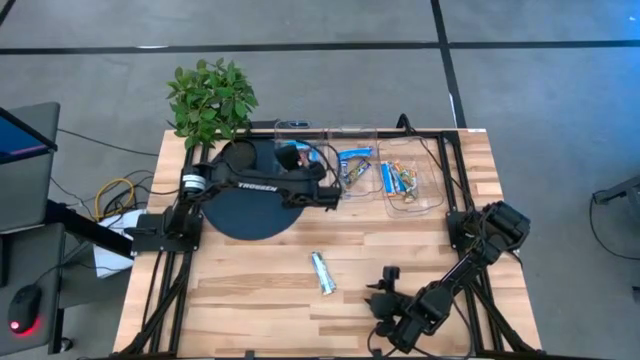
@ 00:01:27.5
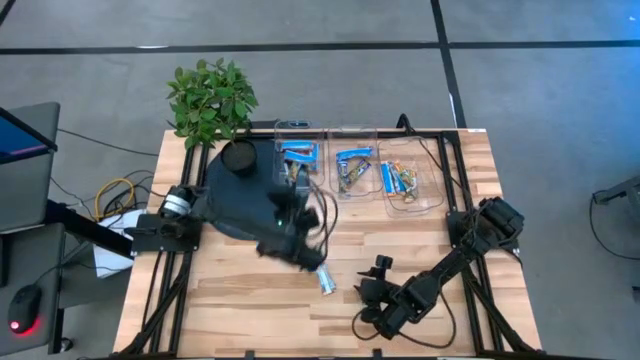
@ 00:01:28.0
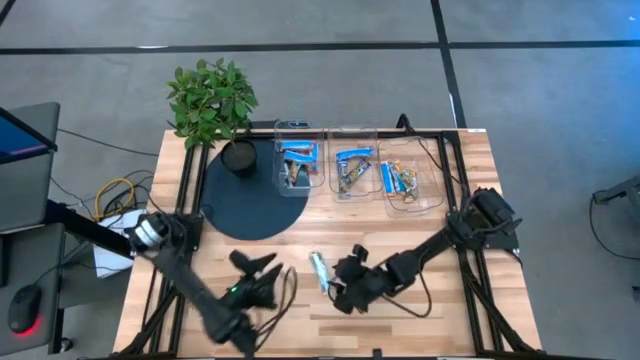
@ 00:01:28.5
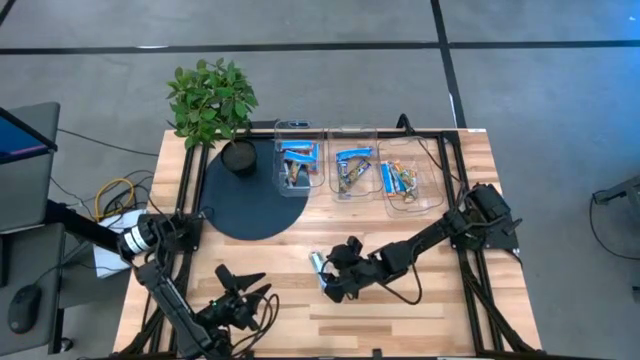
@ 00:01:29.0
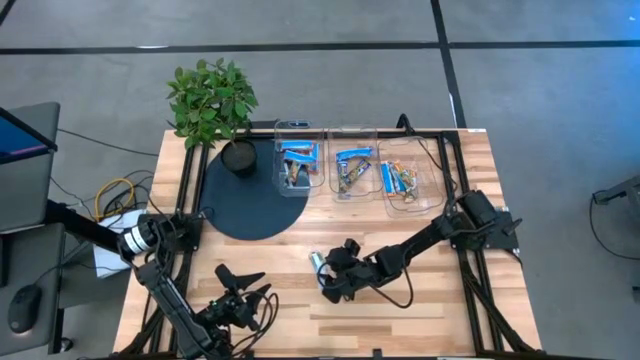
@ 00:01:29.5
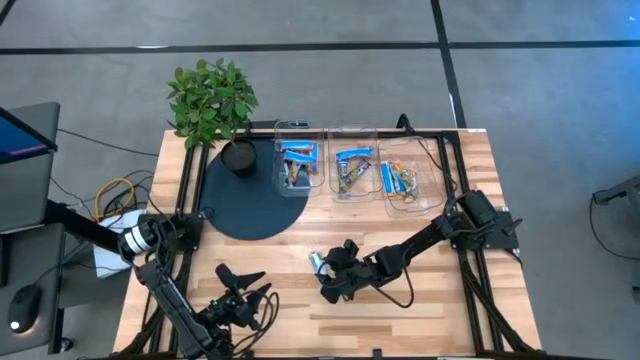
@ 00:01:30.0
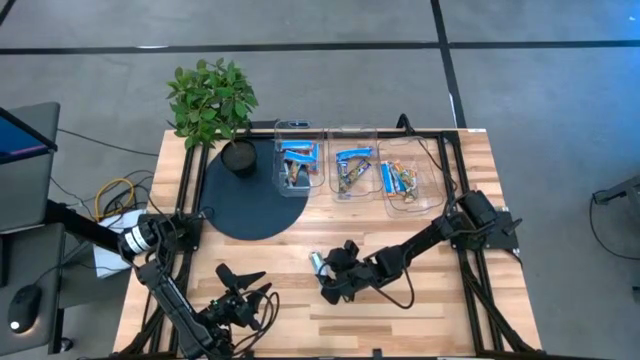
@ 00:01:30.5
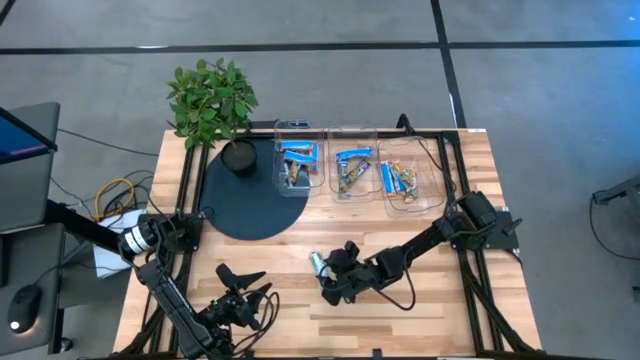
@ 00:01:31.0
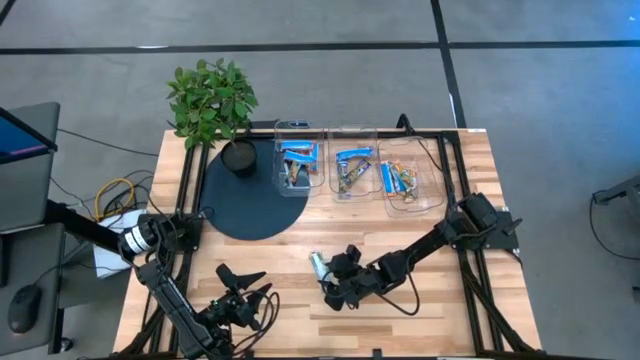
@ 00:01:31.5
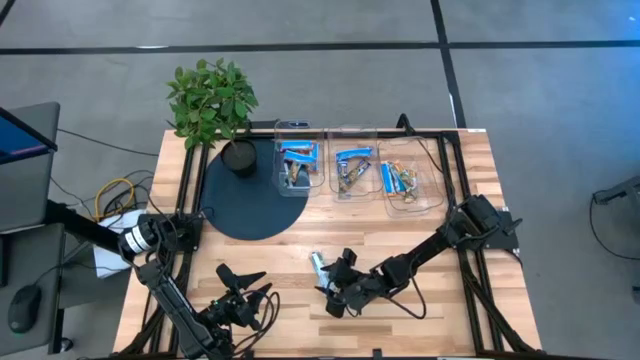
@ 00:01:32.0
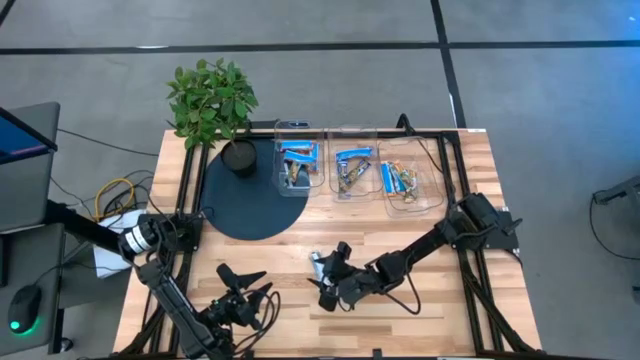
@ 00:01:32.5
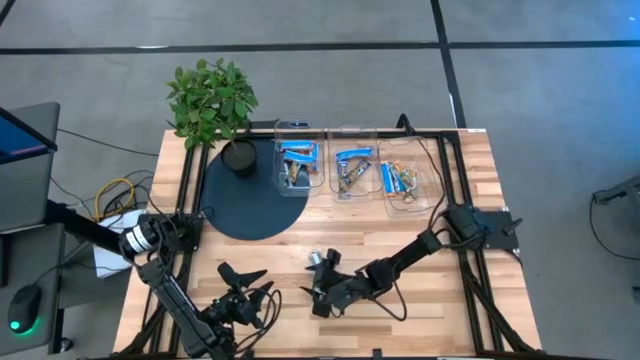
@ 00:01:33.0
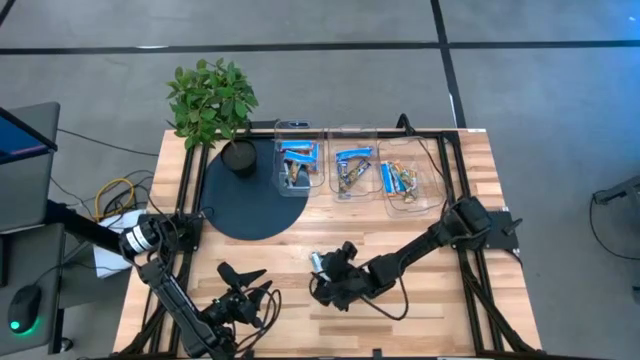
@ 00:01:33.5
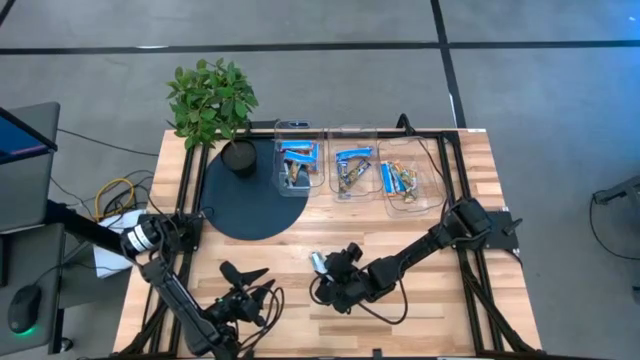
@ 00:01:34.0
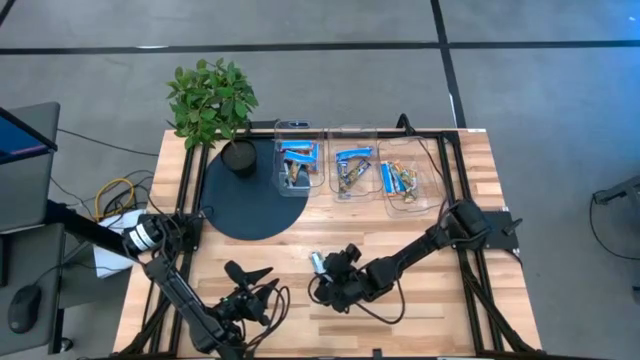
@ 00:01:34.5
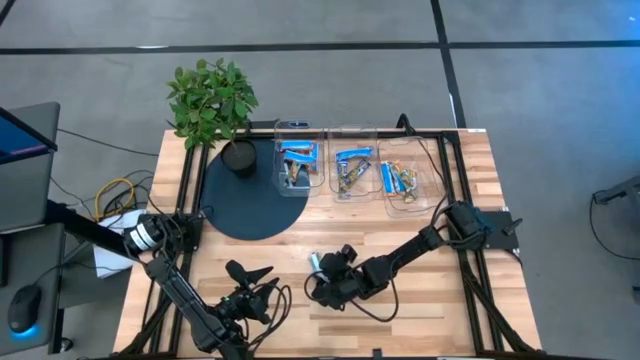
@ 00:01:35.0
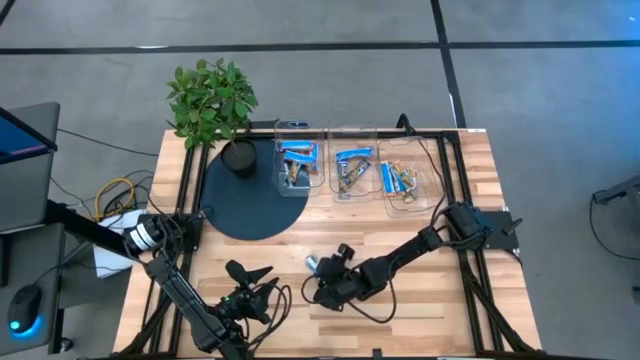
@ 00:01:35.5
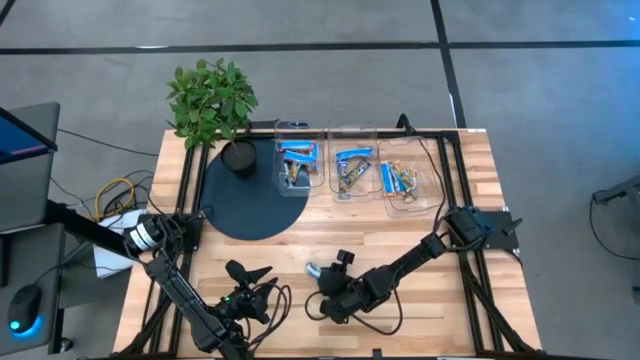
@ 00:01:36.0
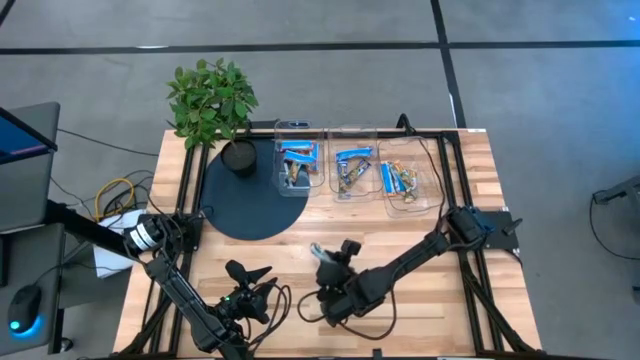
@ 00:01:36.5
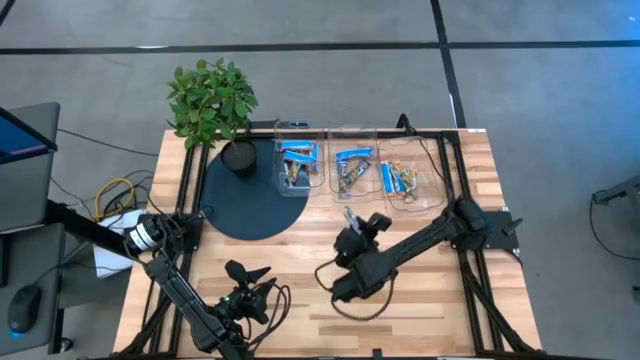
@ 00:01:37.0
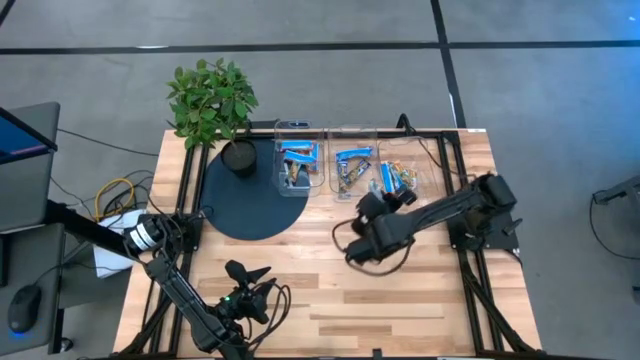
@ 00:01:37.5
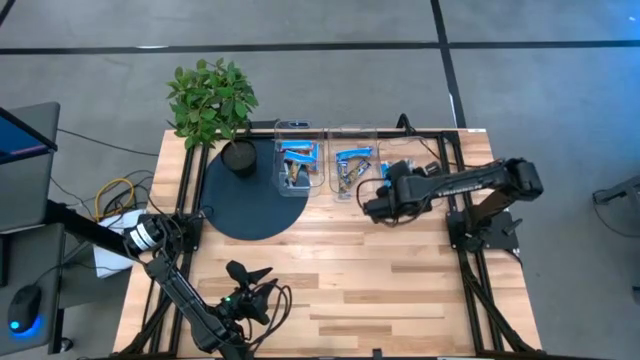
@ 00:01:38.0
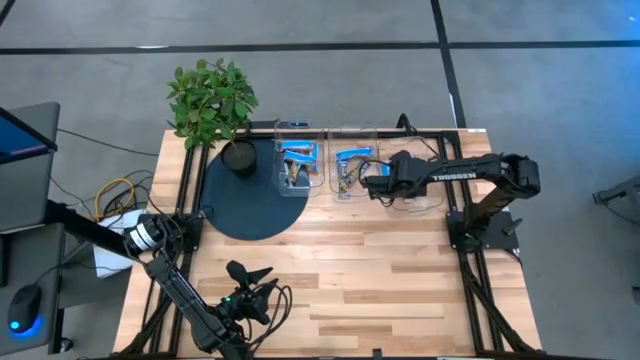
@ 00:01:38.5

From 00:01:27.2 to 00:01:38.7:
Task: Pick and place Granola Bars by type
Put the yellow granola bar into the right transparent bin

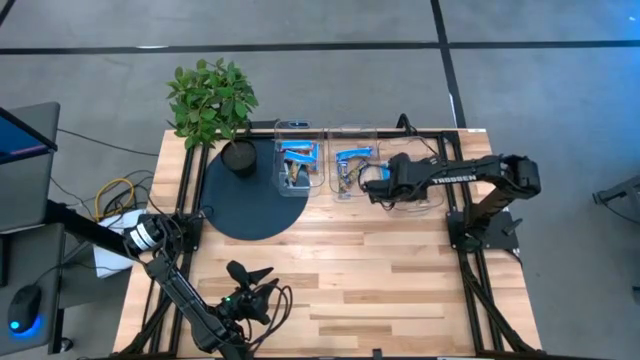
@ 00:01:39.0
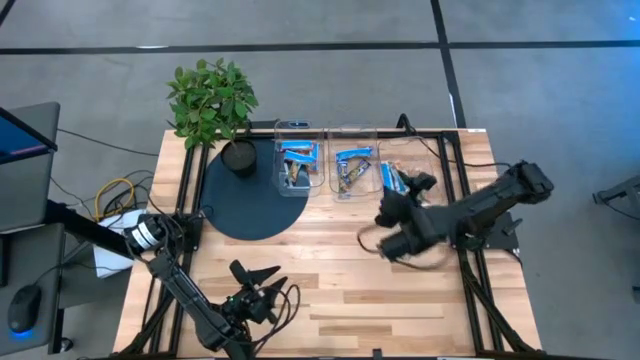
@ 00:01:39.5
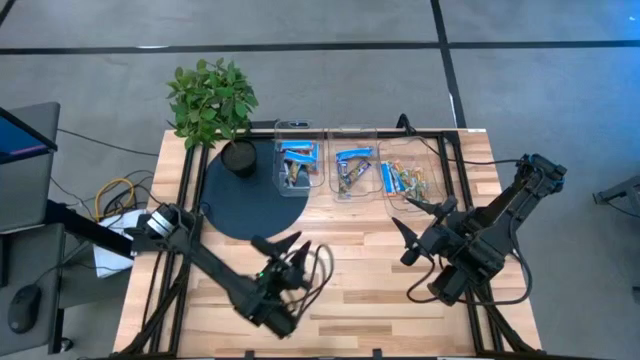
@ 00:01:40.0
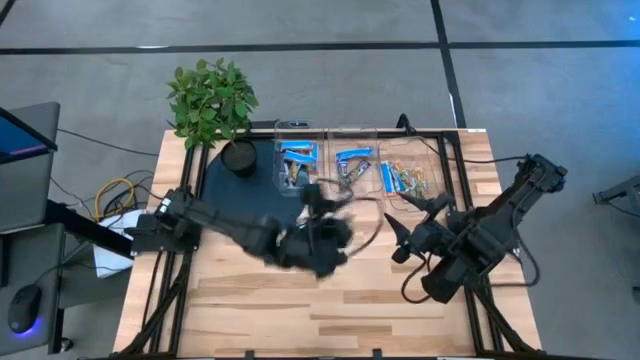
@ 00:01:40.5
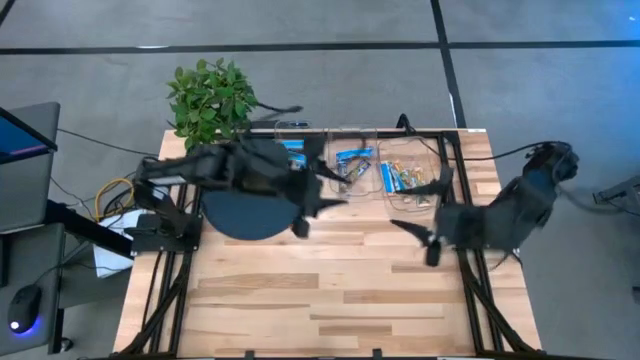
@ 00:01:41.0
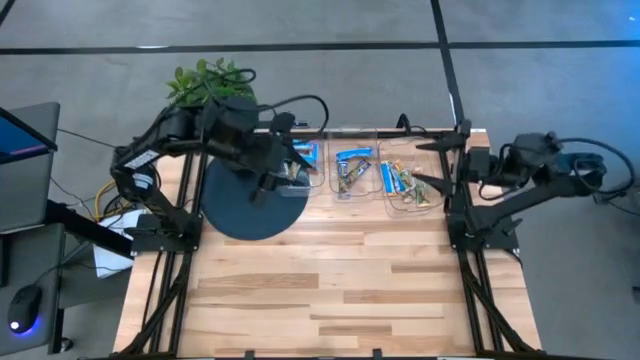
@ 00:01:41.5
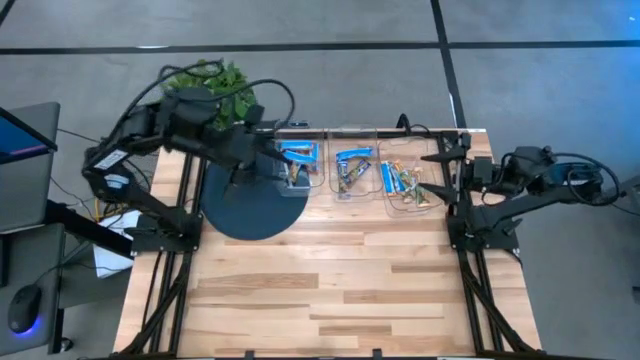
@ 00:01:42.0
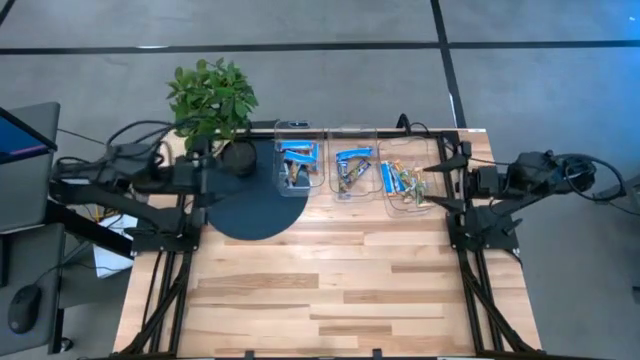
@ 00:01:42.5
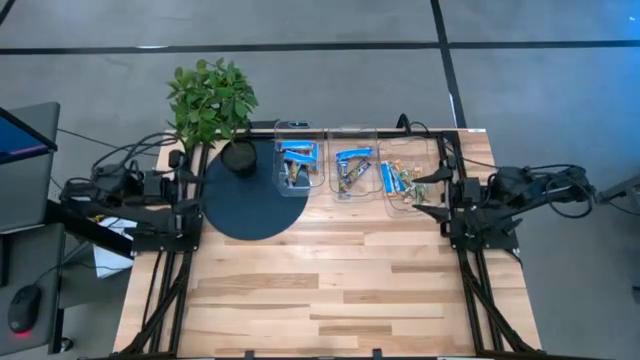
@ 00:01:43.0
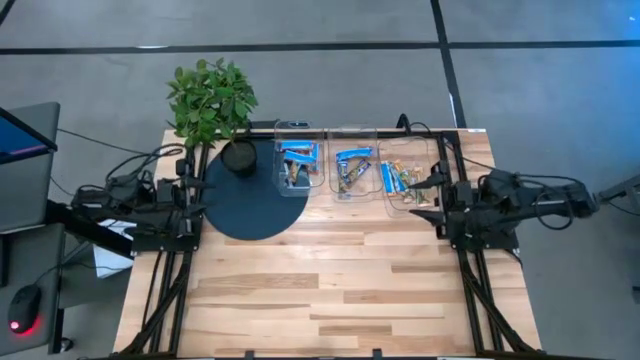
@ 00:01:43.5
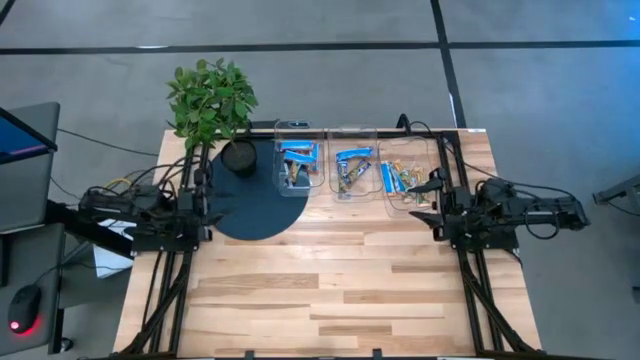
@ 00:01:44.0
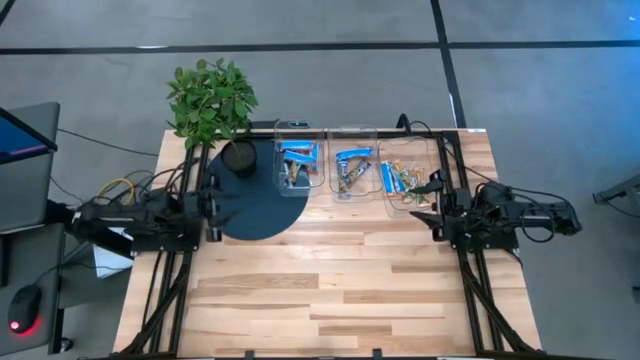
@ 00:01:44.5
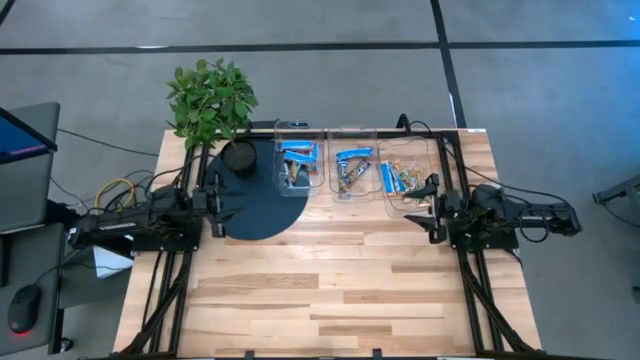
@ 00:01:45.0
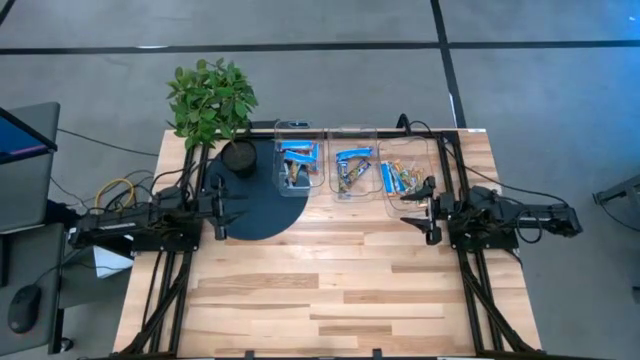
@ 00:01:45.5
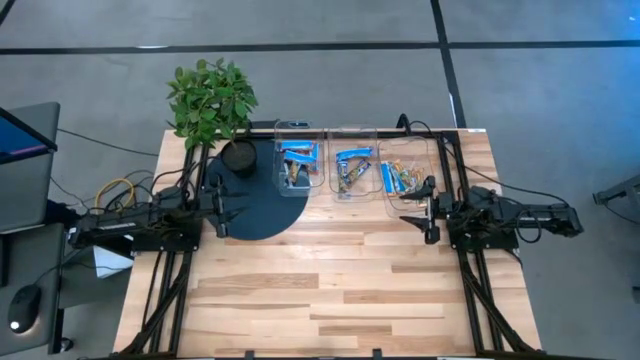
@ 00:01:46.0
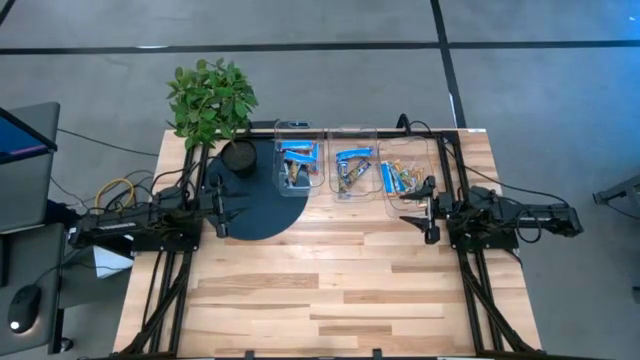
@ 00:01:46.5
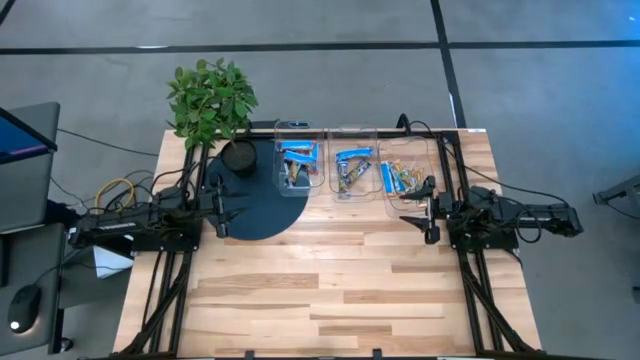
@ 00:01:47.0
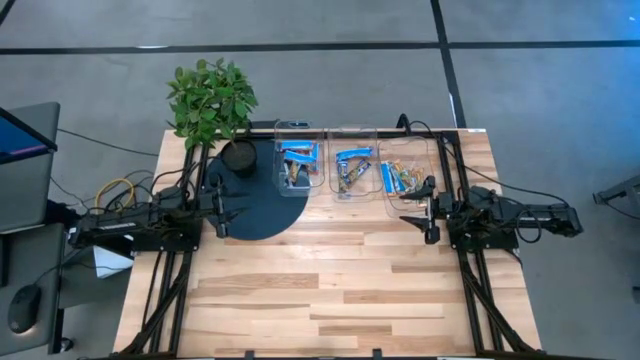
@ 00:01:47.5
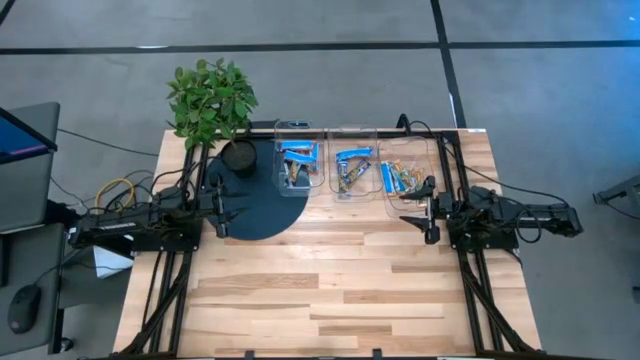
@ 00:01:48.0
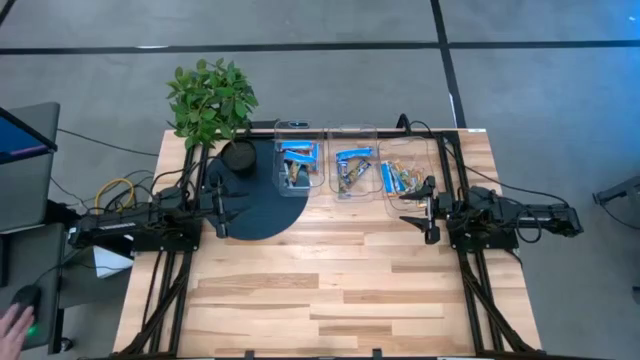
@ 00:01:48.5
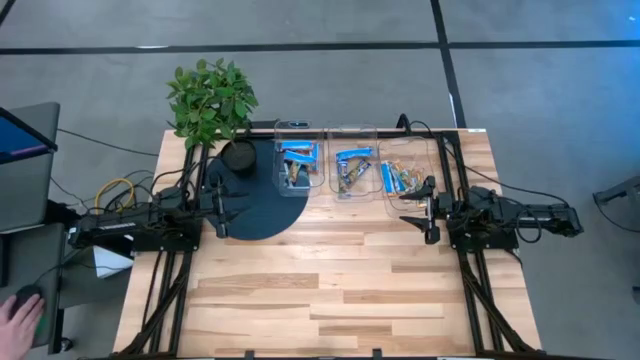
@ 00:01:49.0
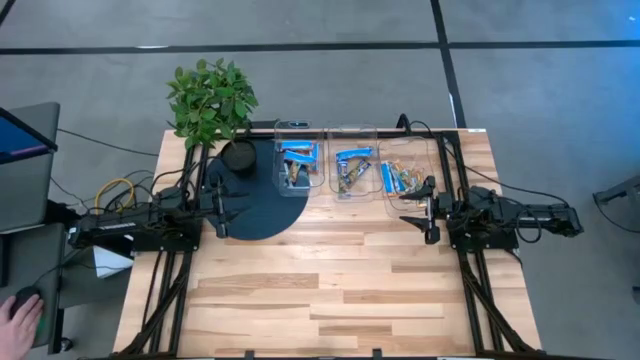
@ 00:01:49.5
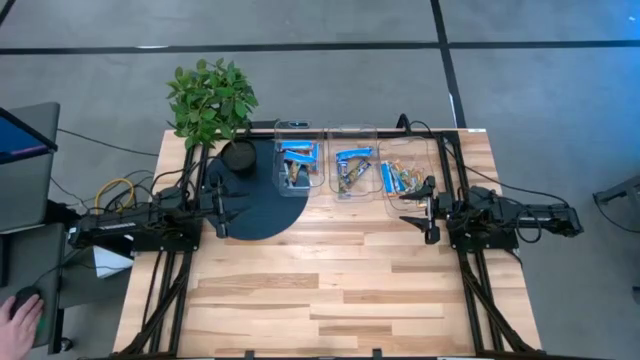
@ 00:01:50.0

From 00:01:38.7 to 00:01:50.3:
Return to Home Position
